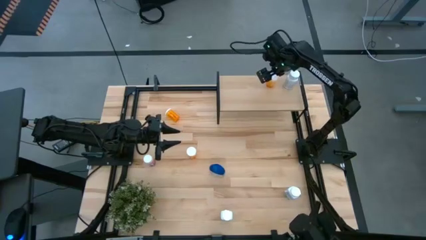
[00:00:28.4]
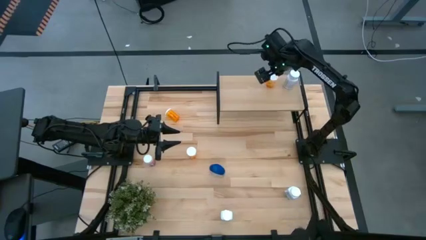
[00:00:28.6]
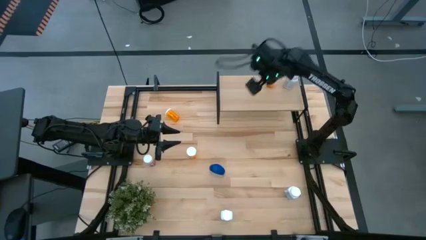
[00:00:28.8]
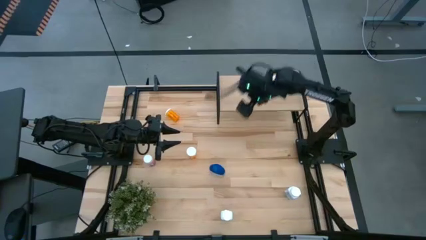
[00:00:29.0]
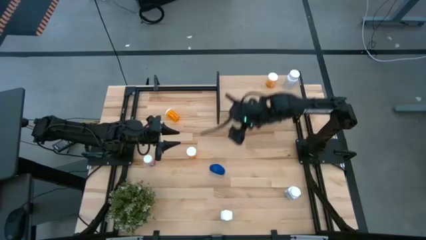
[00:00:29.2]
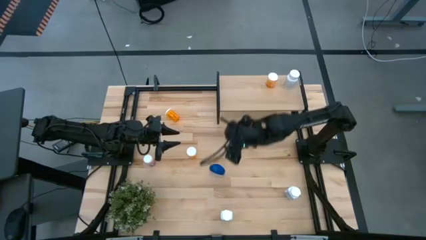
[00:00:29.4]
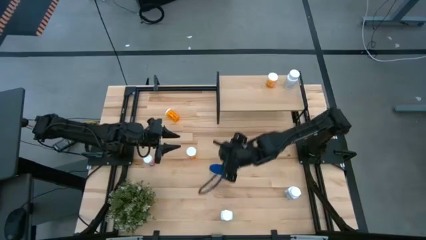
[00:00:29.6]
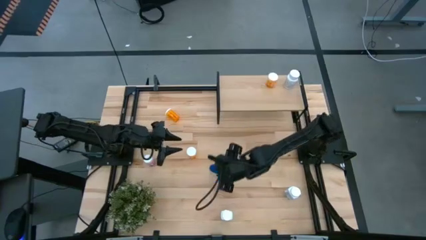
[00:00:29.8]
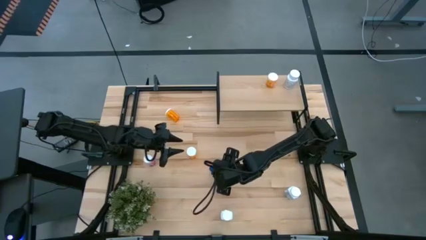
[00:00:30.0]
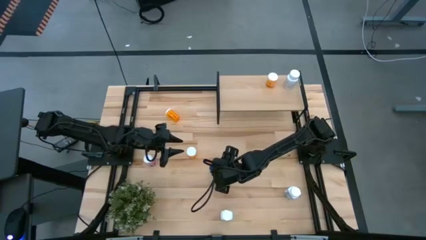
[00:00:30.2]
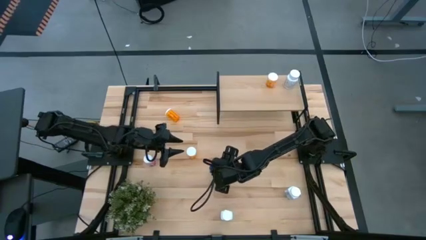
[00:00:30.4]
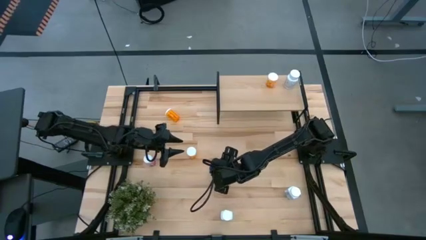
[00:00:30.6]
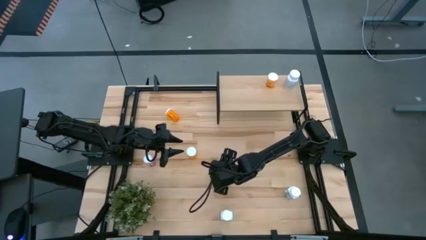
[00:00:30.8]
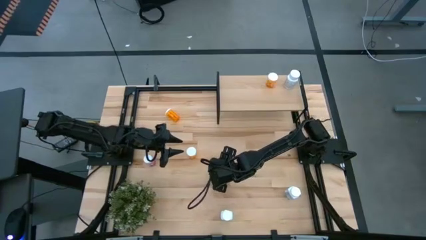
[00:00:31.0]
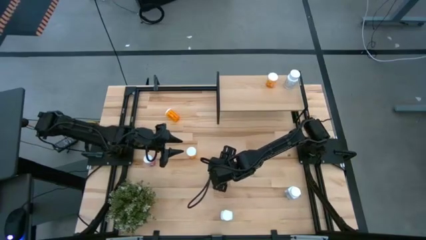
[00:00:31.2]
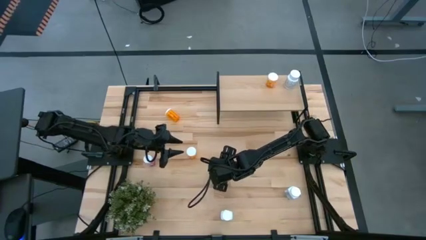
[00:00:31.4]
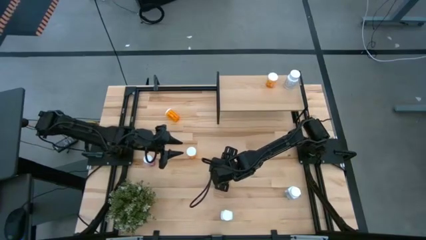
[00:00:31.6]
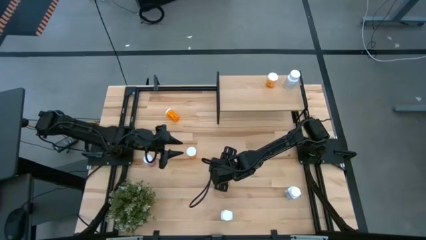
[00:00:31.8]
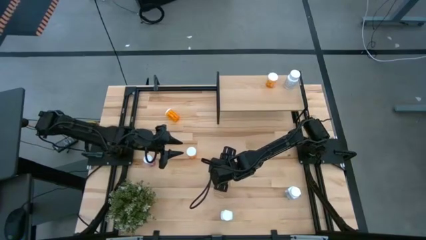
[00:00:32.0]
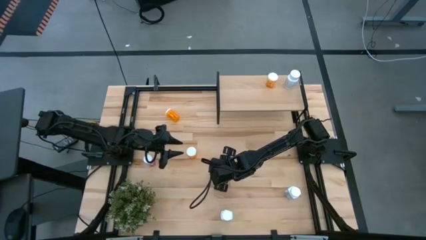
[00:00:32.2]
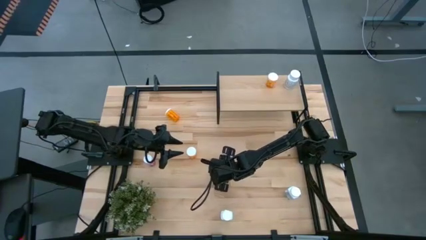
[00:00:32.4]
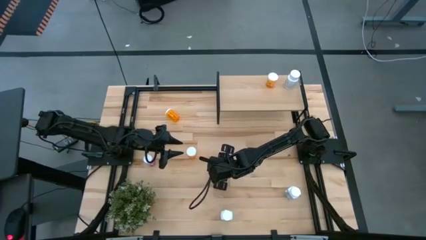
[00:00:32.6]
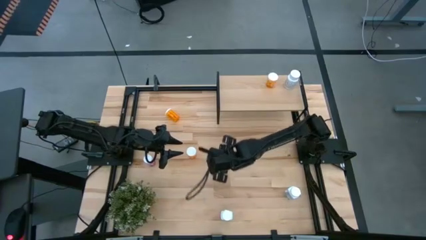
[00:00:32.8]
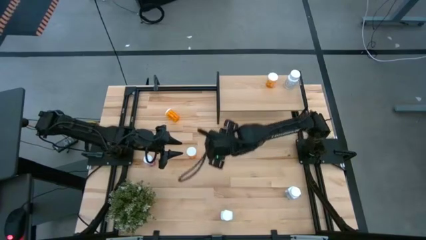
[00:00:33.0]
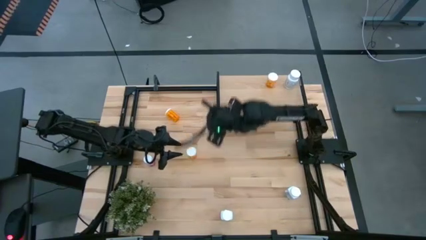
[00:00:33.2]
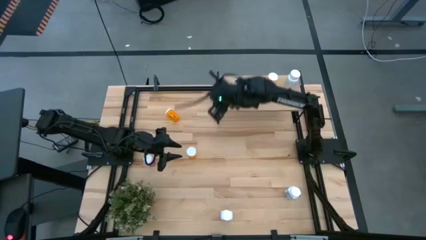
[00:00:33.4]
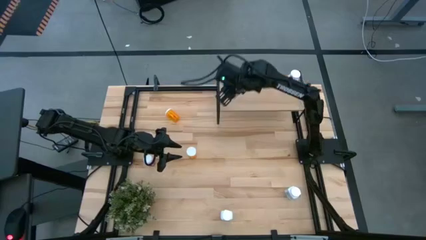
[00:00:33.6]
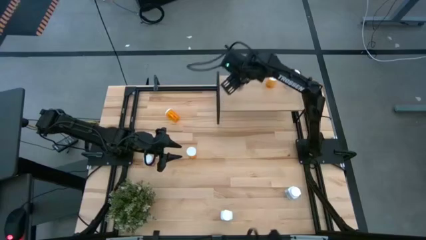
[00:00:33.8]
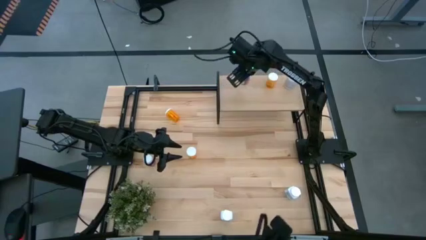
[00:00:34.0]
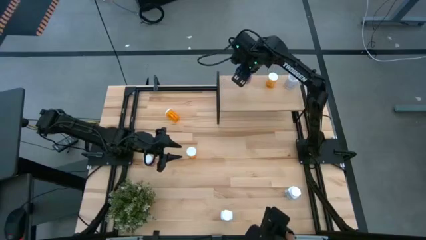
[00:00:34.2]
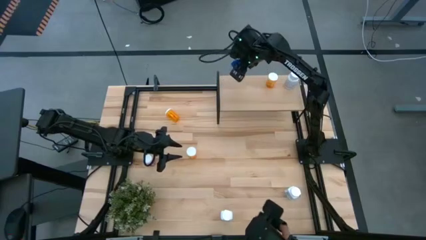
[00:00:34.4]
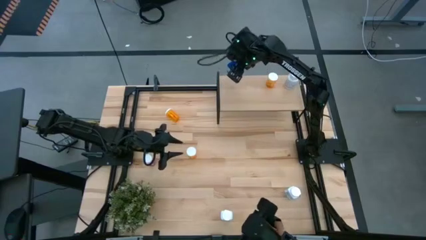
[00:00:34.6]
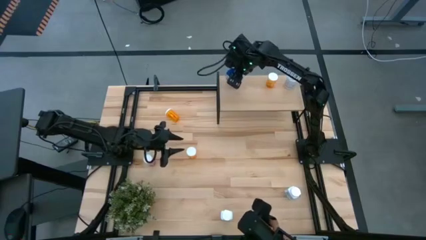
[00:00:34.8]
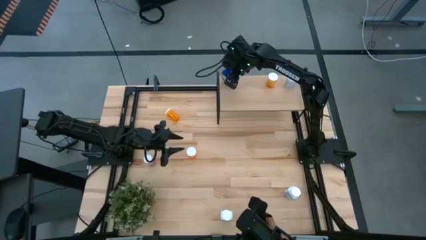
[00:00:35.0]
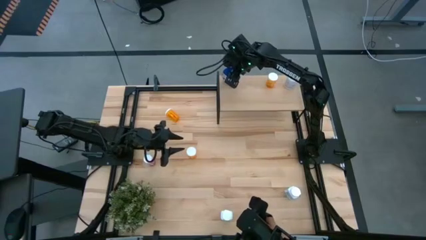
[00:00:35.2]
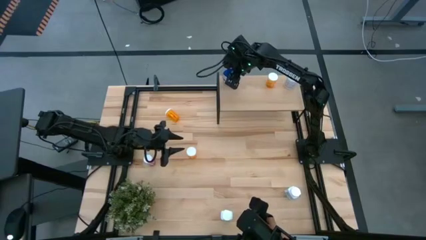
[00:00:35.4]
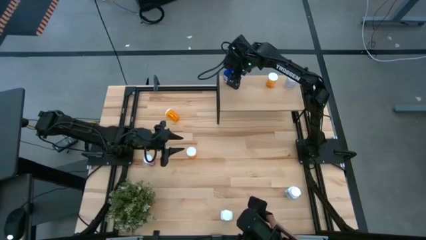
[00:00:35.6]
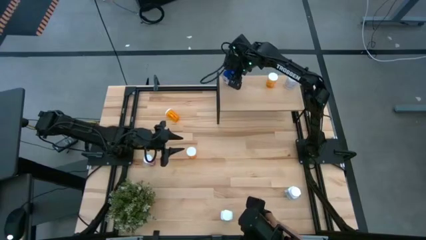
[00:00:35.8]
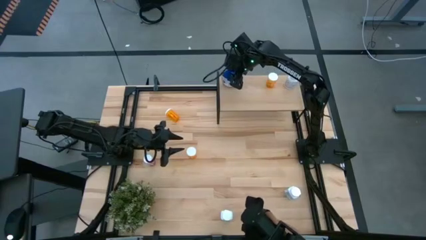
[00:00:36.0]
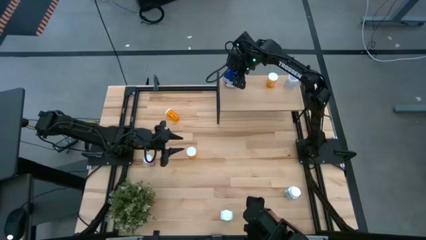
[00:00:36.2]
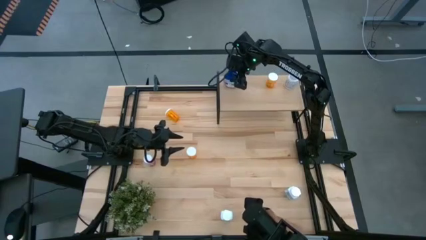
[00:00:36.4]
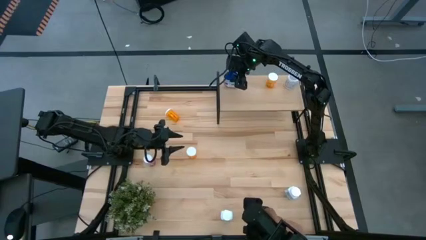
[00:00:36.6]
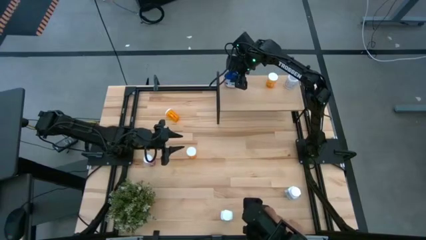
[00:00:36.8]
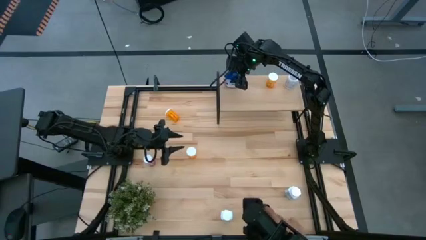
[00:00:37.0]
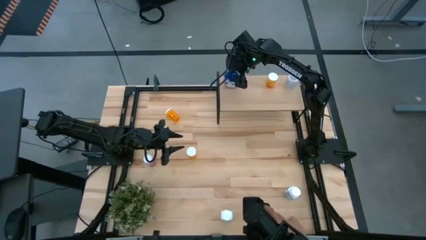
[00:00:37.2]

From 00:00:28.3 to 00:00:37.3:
Task: Pick and place medicine bottles onto shelf by color
Put the blue pill bottle on the shelf

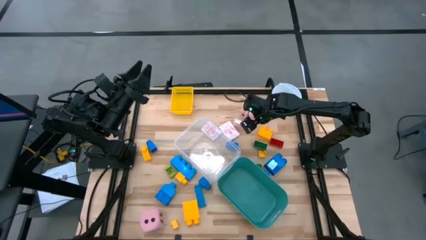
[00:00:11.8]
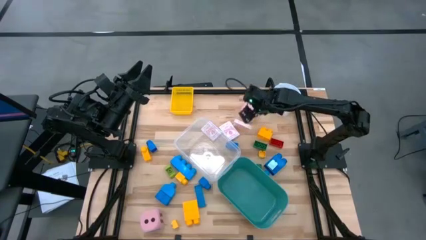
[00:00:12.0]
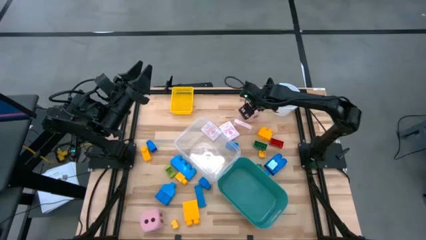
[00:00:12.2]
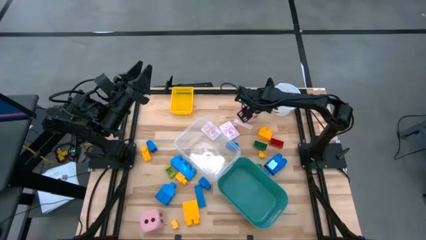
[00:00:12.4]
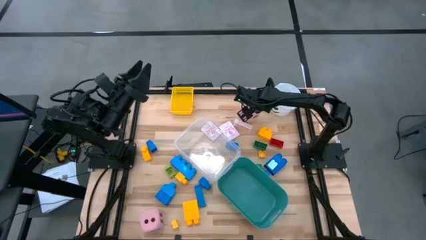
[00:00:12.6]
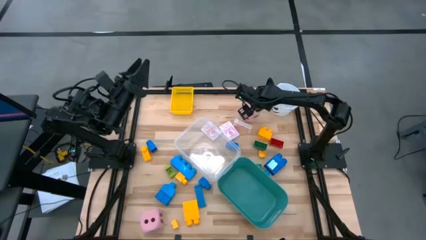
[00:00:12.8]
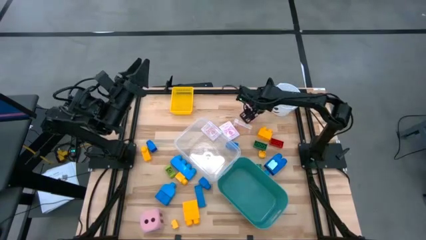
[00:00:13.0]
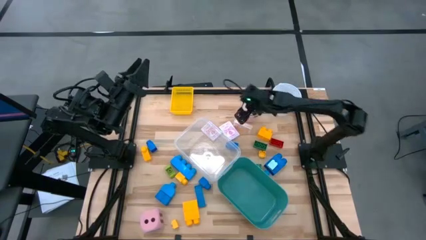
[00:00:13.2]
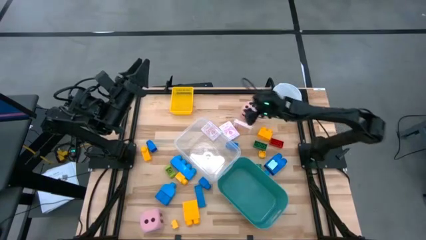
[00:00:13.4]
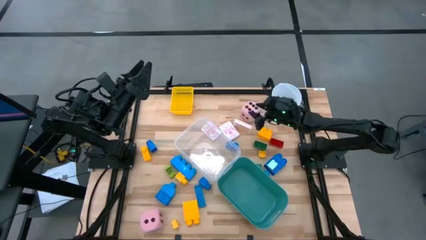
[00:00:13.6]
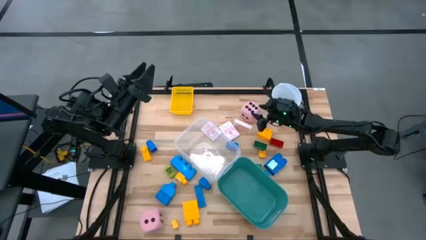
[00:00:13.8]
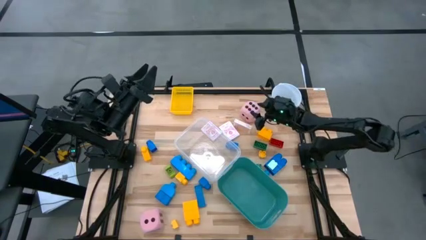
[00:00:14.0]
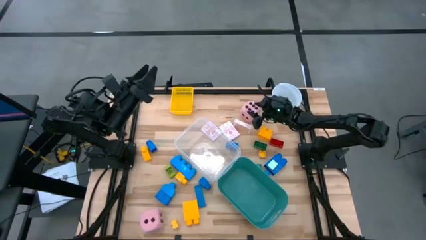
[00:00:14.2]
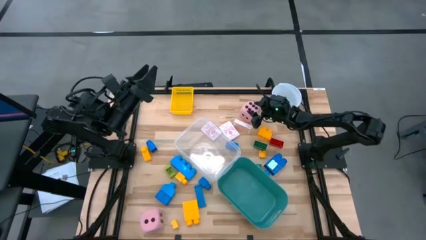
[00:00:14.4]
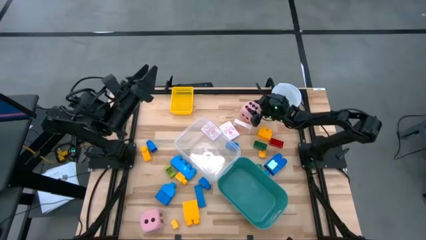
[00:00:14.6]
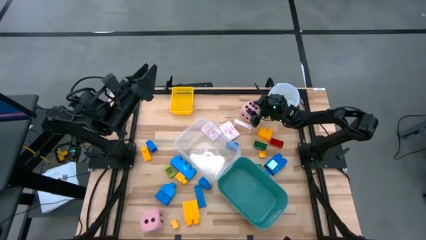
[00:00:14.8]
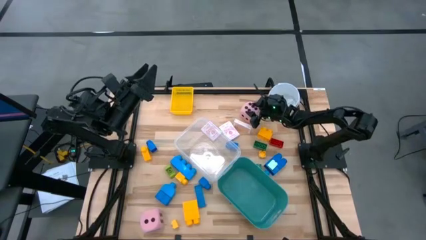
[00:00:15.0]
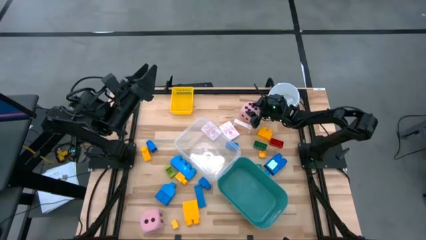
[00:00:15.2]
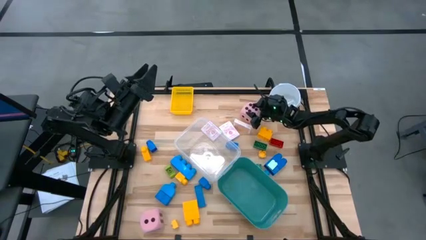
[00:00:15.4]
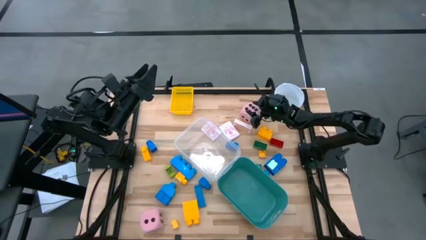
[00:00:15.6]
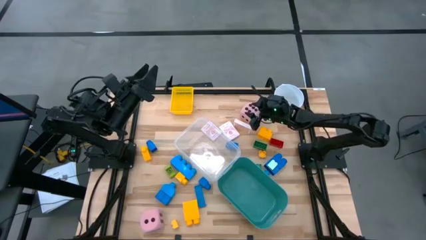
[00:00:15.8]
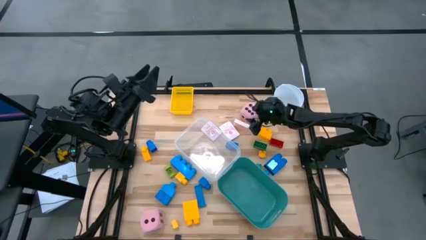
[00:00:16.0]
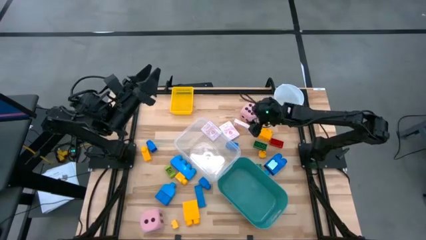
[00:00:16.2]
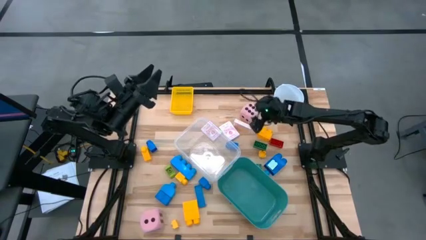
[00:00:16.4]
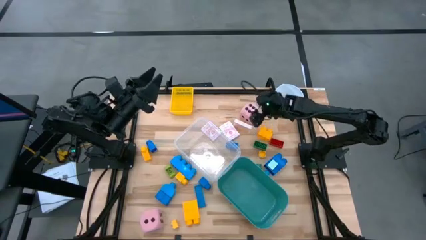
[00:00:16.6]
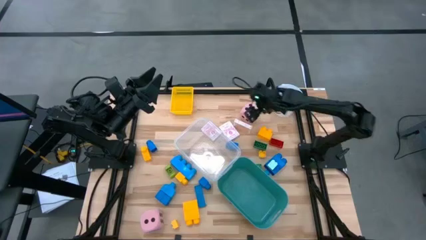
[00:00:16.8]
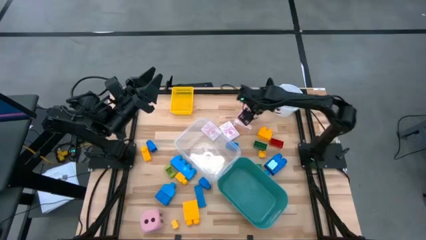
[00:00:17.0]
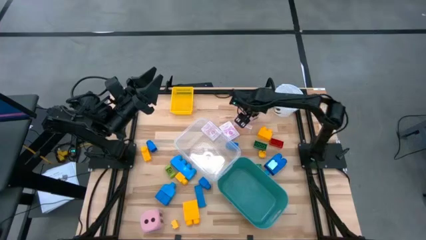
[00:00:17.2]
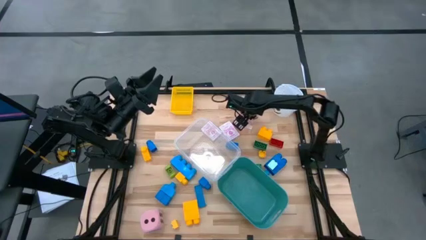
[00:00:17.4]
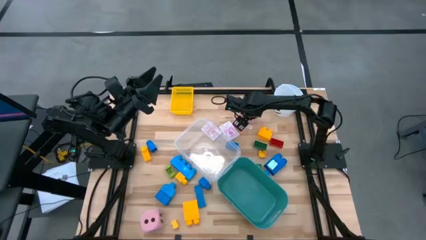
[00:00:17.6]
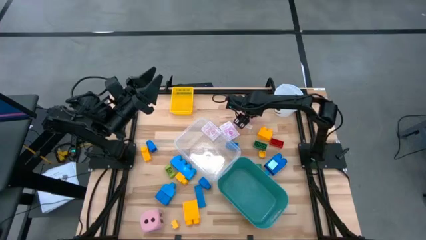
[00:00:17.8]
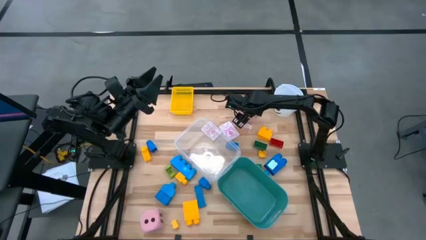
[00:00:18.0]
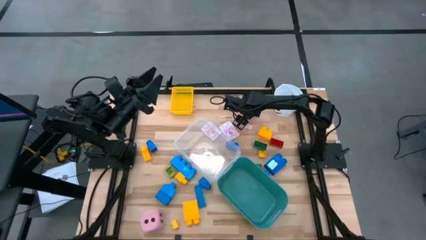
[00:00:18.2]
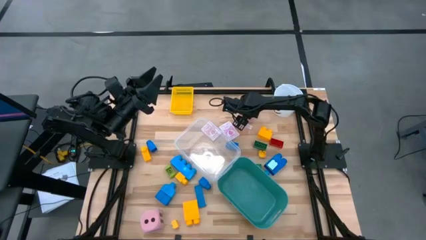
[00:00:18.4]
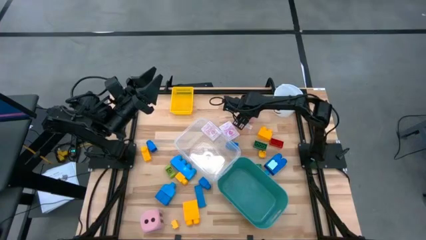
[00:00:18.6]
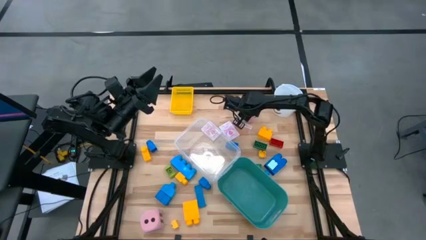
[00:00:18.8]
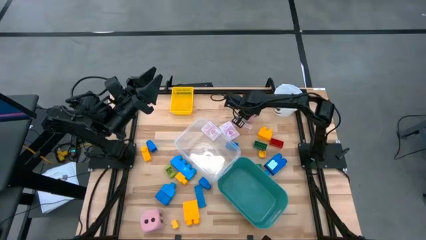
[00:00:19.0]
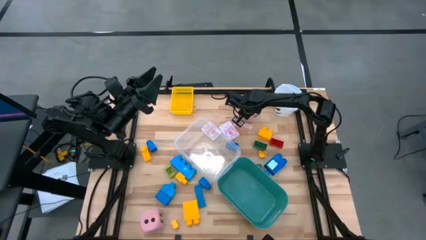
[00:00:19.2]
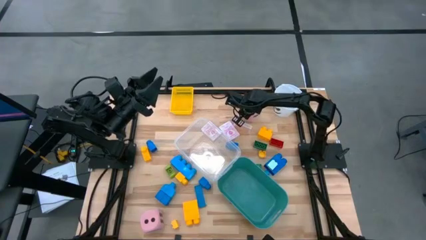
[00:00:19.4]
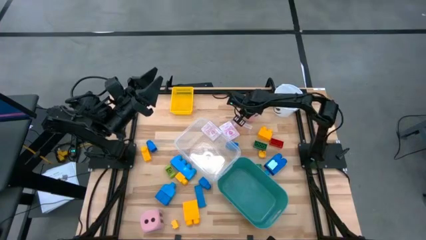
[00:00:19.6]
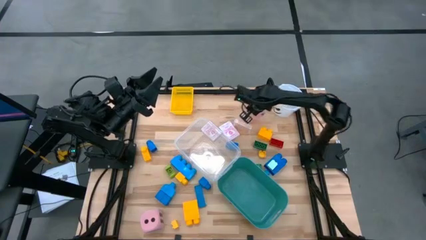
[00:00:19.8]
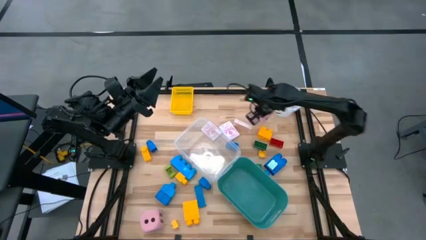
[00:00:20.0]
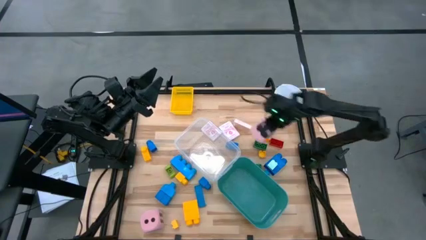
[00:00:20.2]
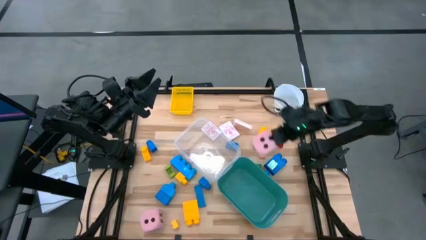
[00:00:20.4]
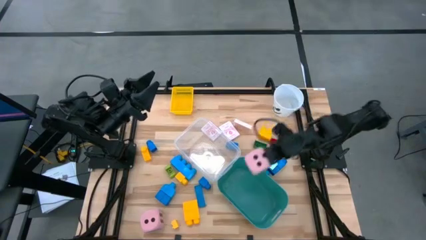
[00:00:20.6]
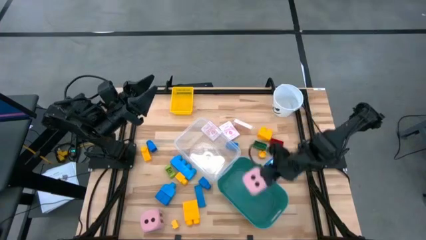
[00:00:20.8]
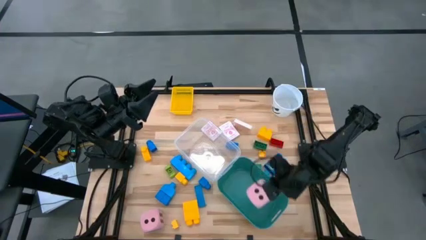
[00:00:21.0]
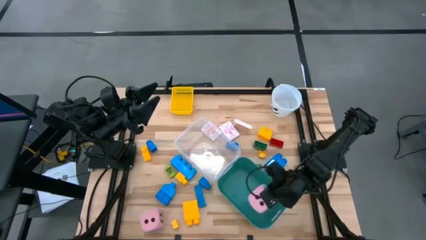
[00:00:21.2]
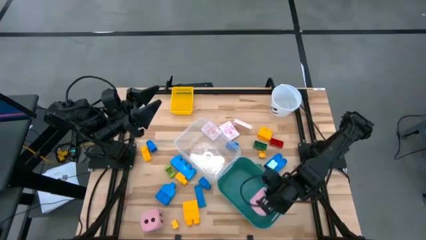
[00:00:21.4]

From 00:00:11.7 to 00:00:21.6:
Task: Pick & Place Toys
Put the pink die into the green bin
